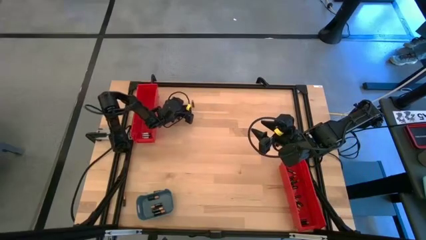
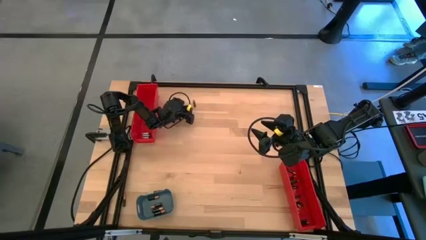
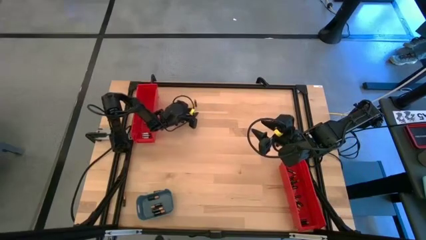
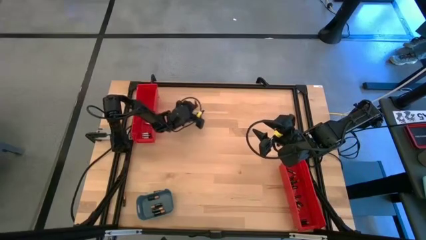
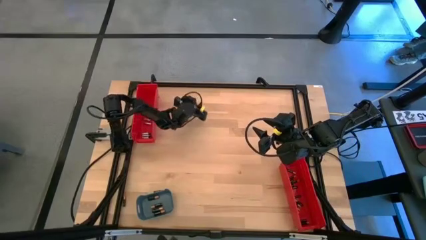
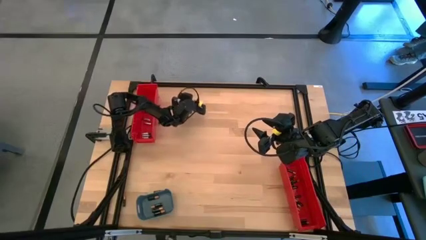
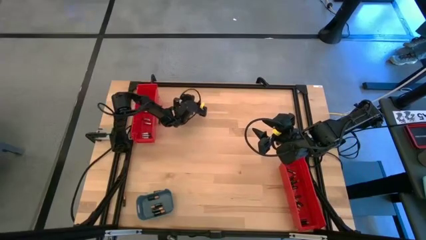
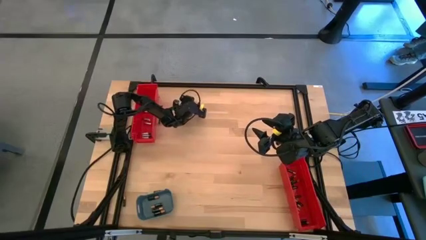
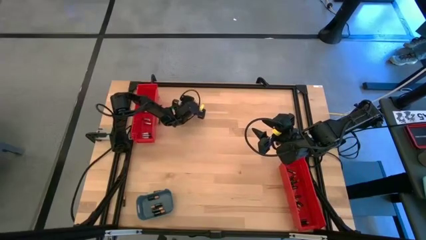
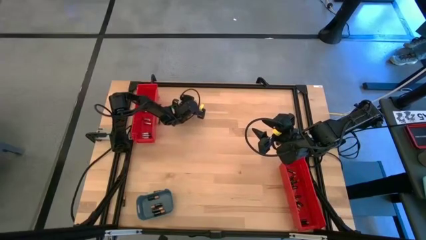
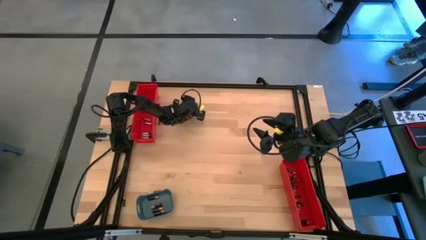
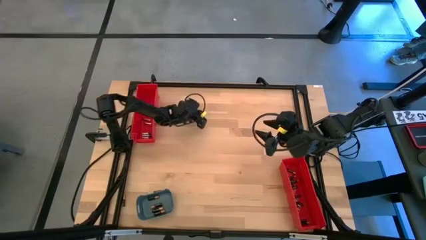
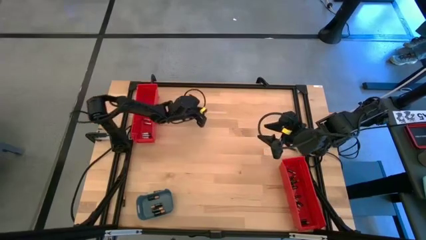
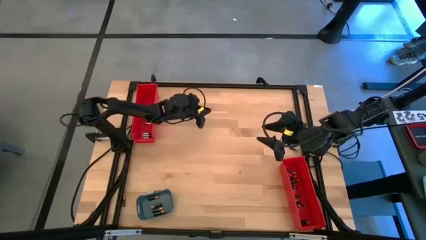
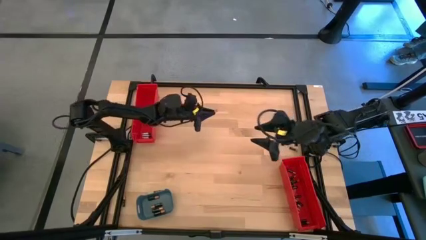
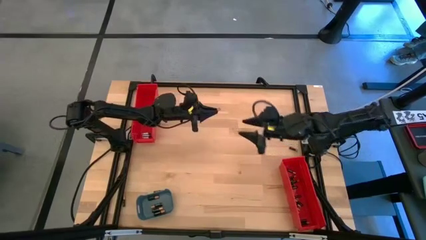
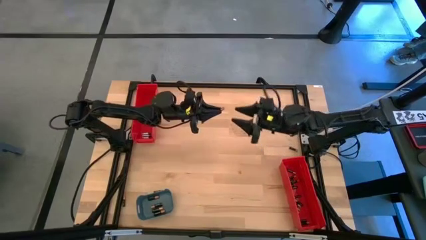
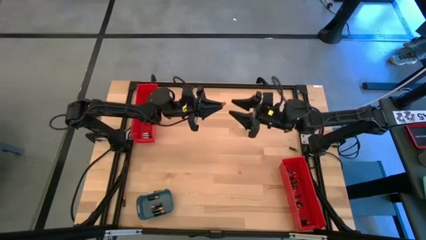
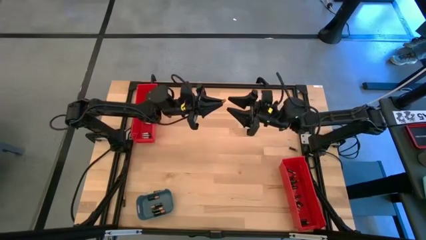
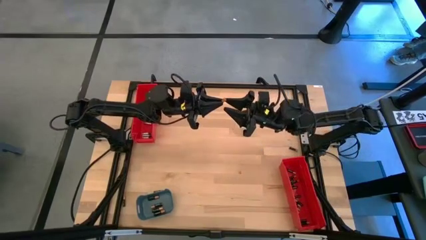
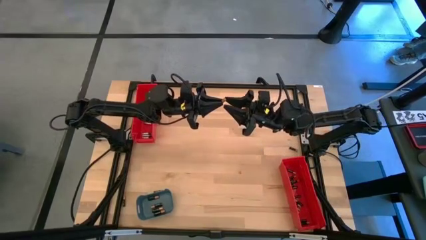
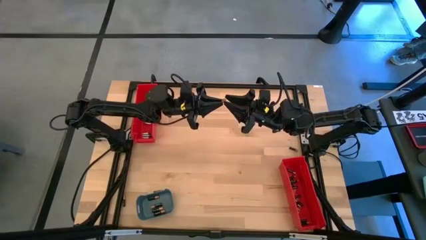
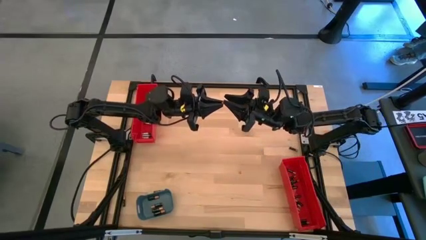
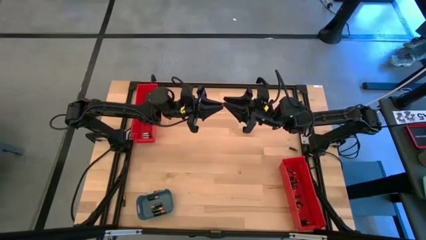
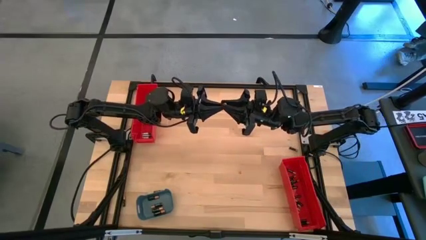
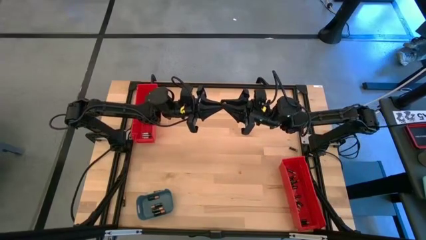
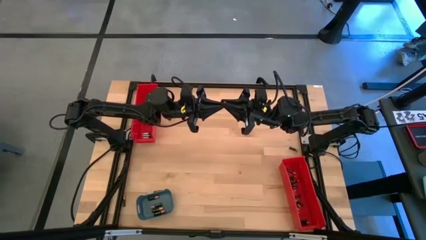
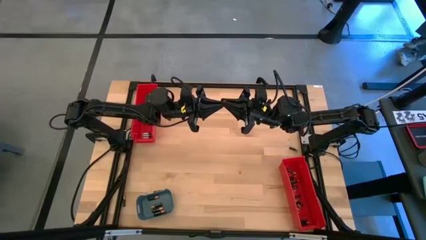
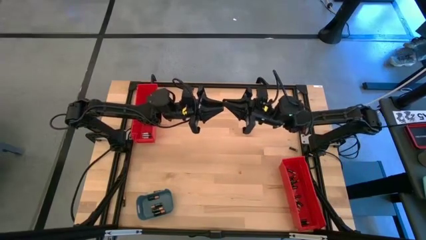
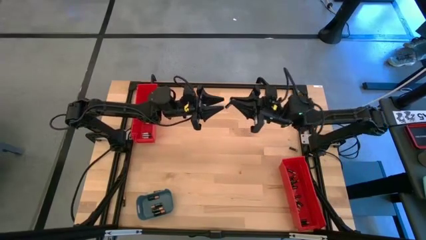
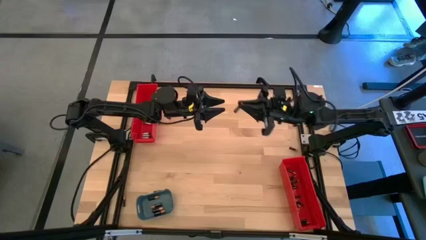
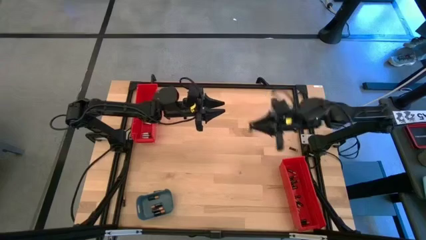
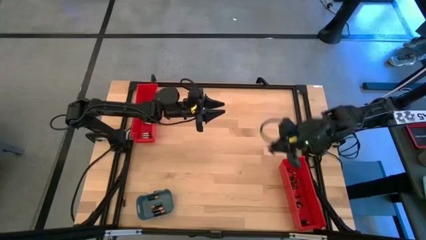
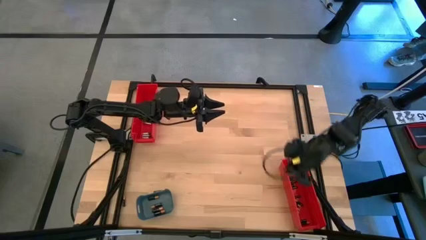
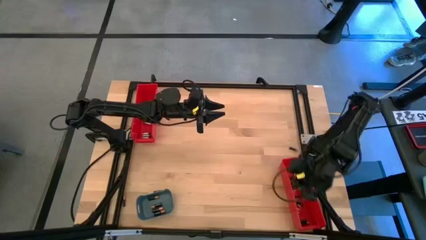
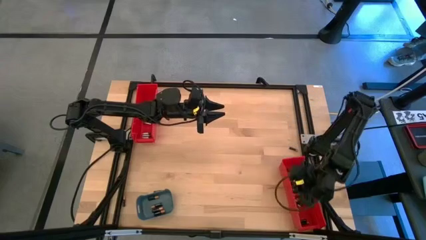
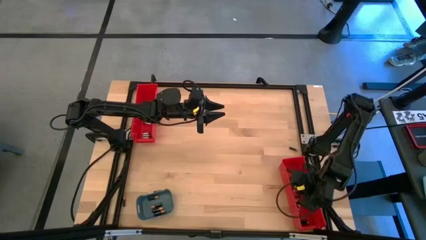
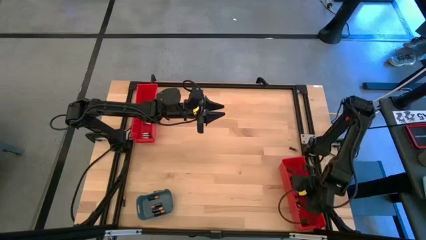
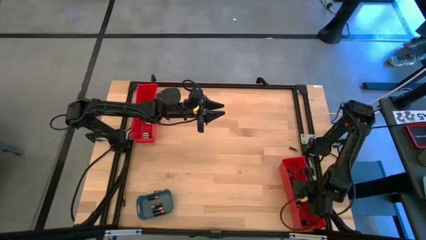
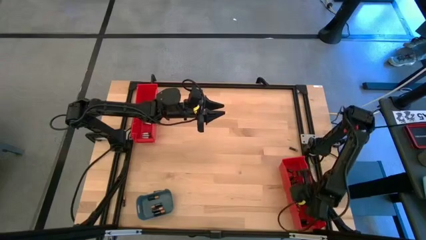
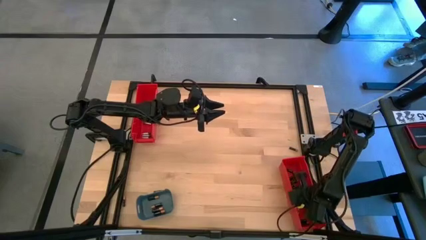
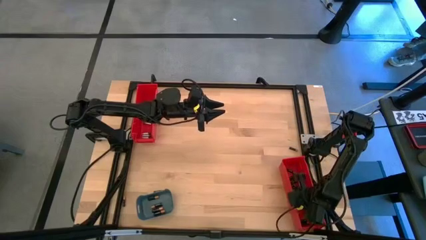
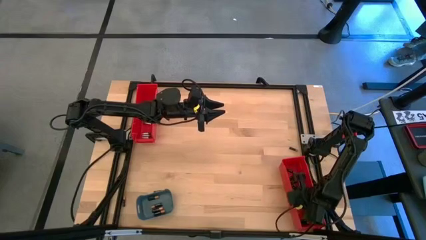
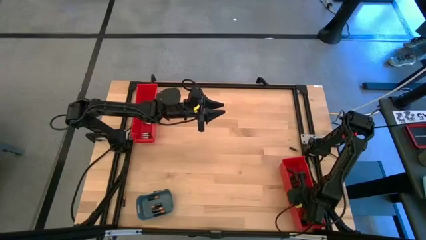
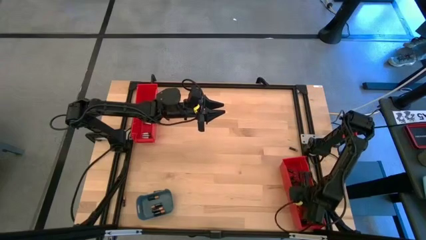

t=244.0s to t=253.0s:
Task: Sort batteries
Put the small black battery into the bottom red bin
